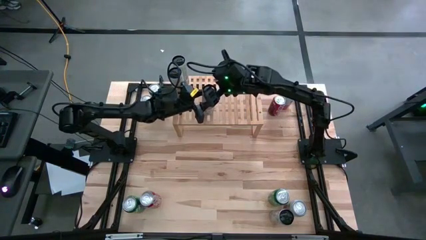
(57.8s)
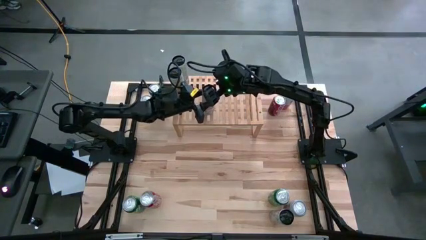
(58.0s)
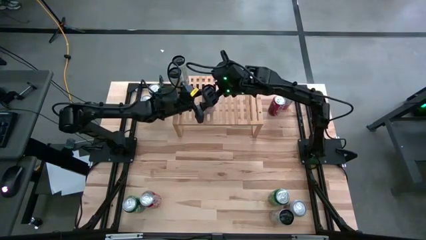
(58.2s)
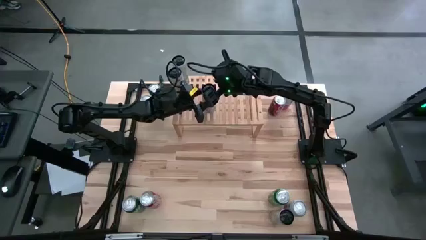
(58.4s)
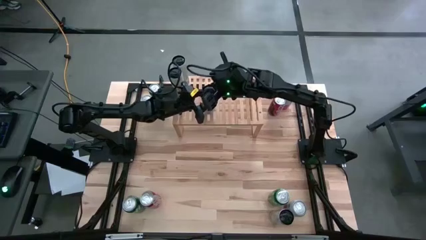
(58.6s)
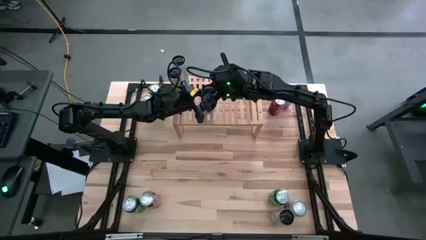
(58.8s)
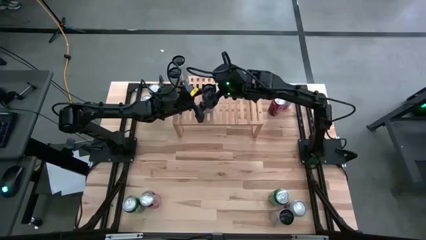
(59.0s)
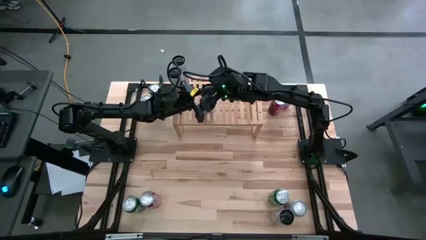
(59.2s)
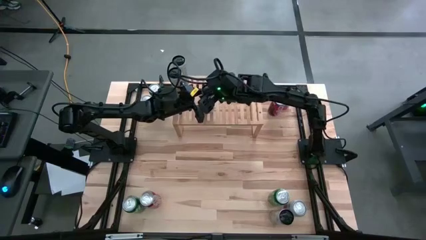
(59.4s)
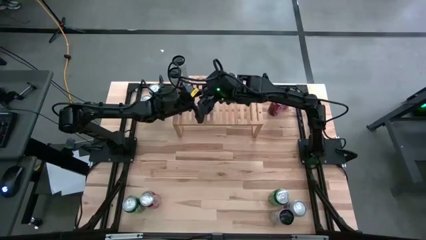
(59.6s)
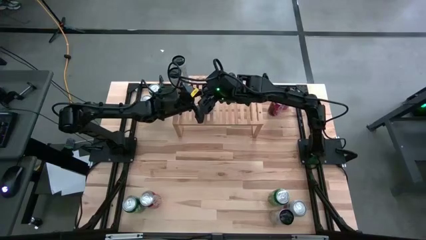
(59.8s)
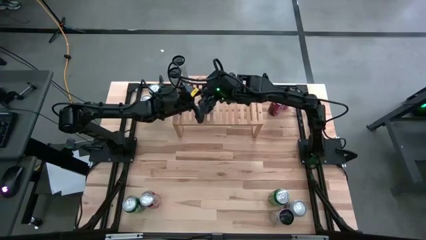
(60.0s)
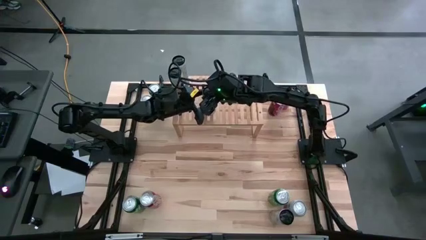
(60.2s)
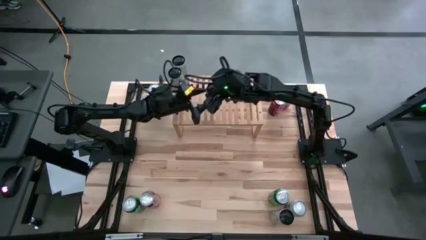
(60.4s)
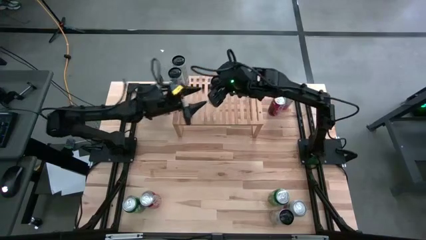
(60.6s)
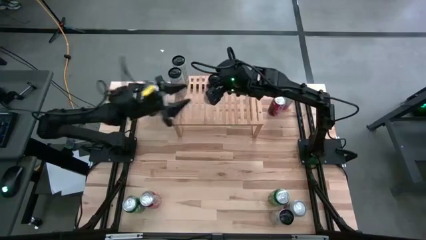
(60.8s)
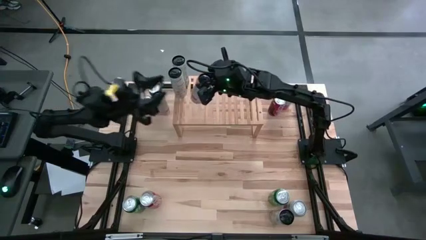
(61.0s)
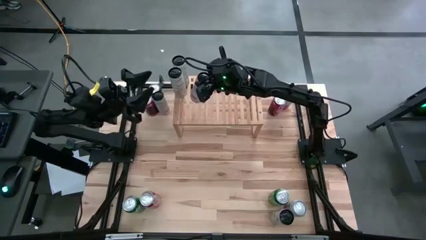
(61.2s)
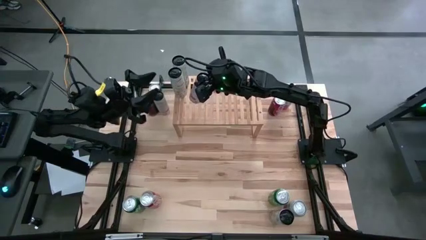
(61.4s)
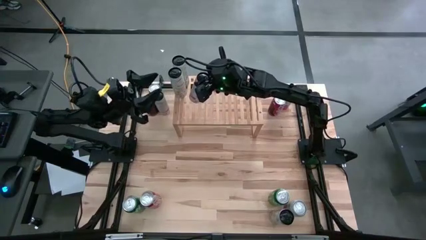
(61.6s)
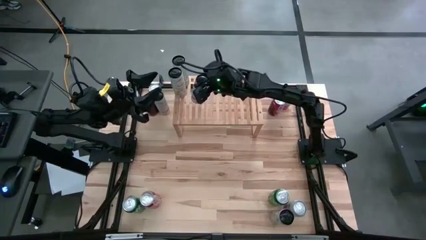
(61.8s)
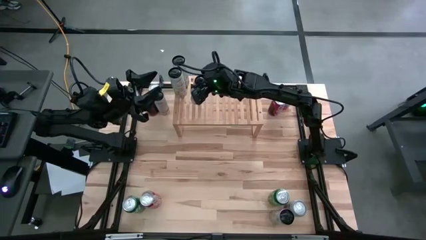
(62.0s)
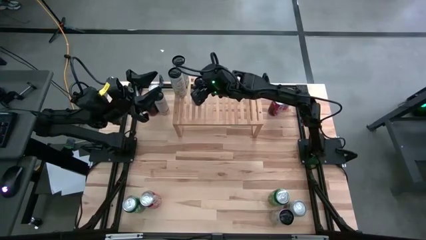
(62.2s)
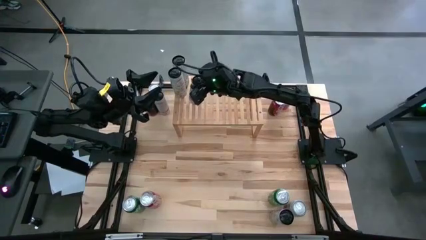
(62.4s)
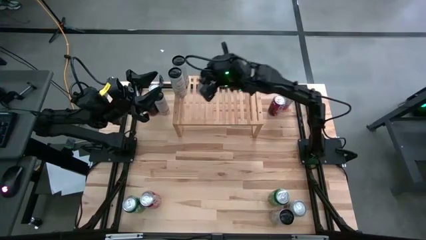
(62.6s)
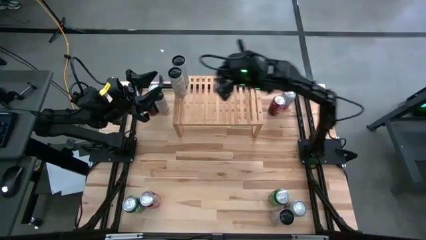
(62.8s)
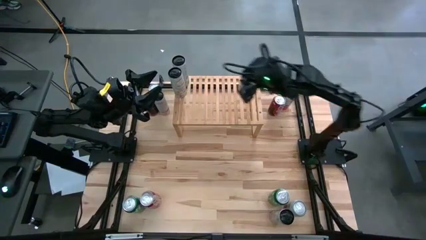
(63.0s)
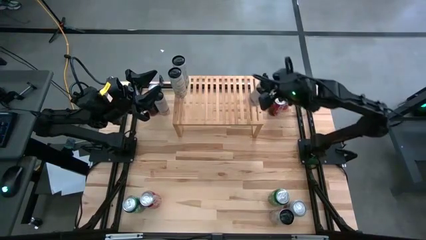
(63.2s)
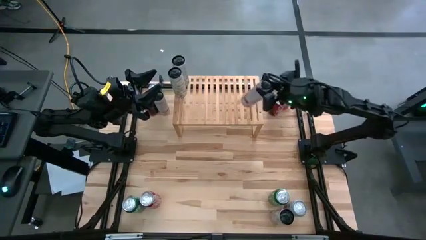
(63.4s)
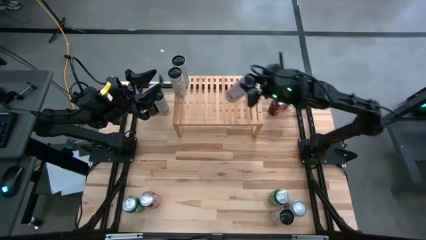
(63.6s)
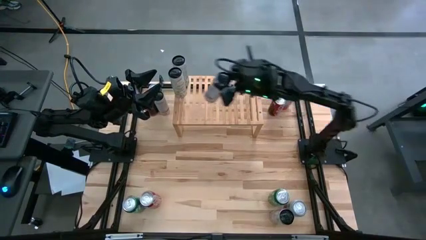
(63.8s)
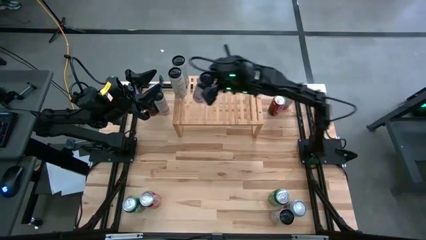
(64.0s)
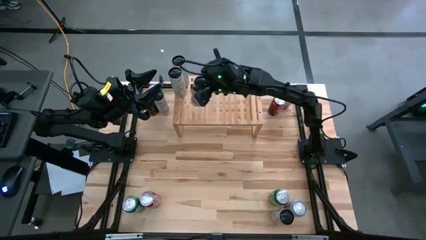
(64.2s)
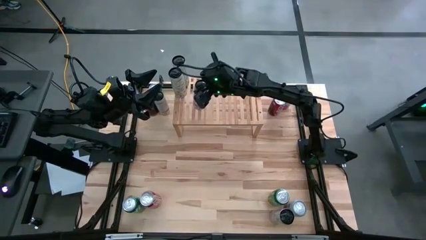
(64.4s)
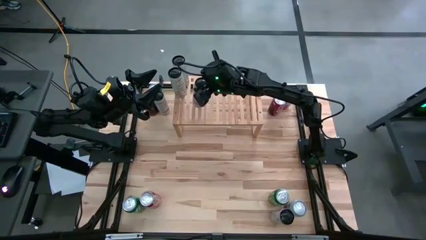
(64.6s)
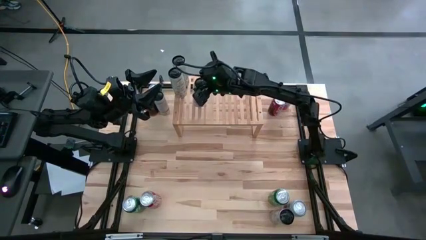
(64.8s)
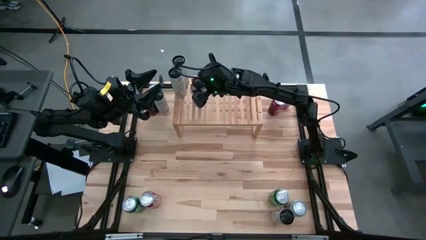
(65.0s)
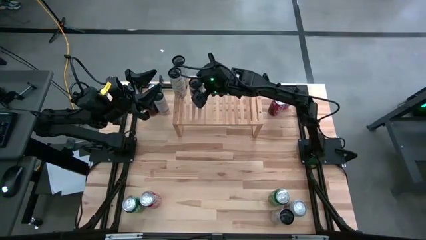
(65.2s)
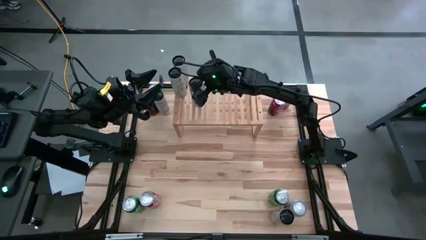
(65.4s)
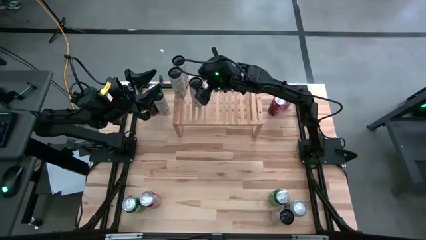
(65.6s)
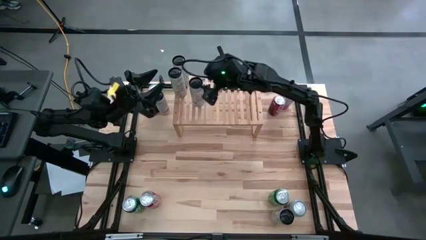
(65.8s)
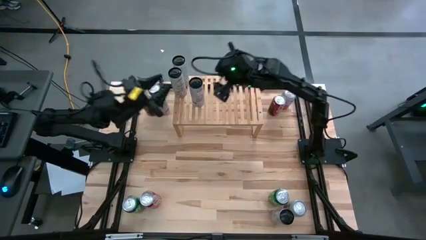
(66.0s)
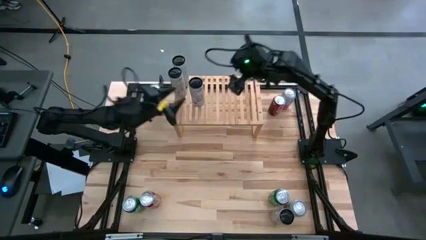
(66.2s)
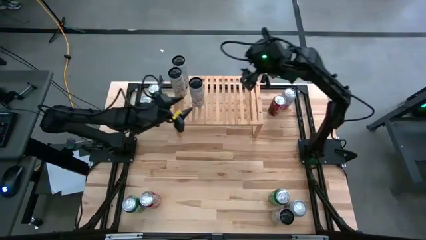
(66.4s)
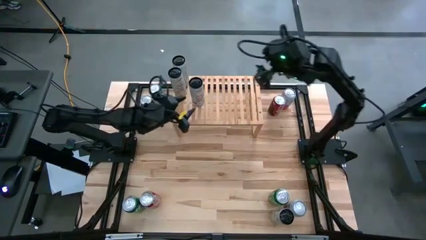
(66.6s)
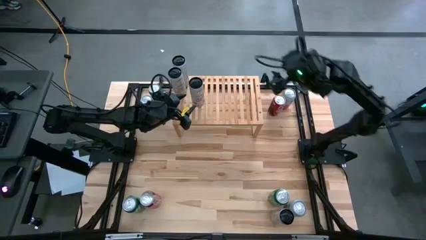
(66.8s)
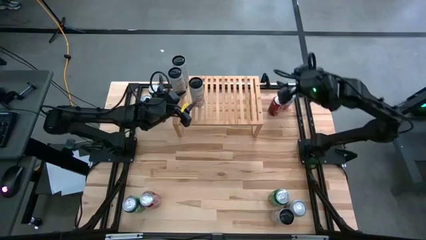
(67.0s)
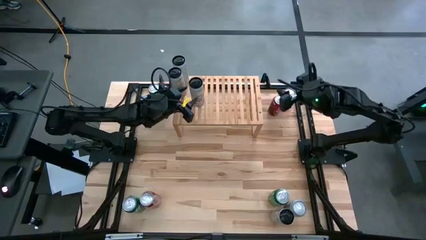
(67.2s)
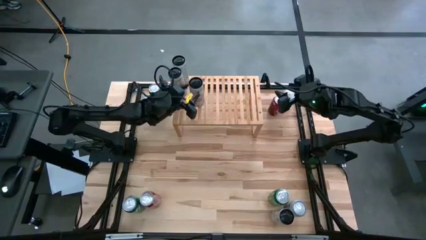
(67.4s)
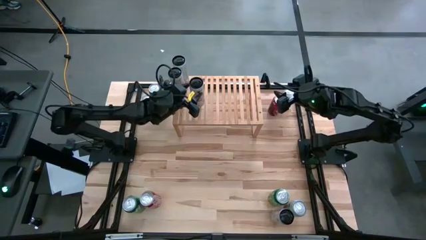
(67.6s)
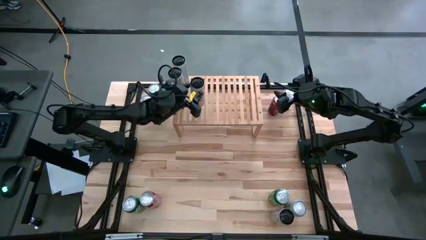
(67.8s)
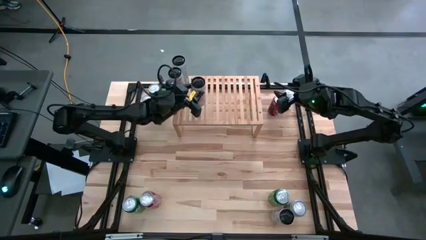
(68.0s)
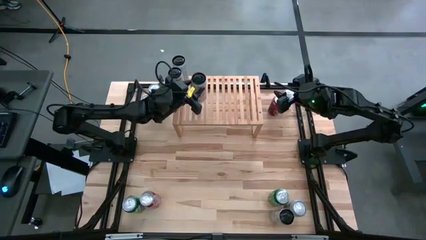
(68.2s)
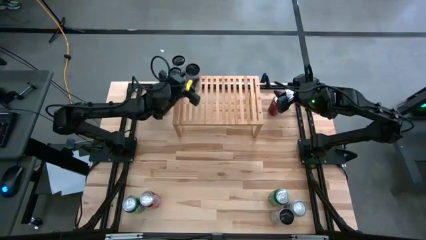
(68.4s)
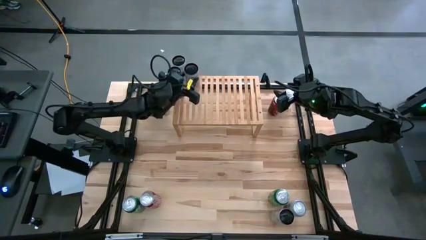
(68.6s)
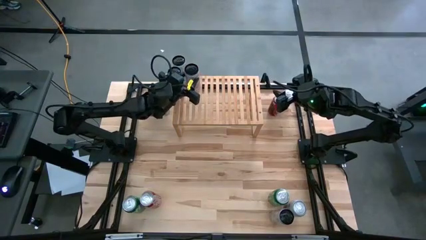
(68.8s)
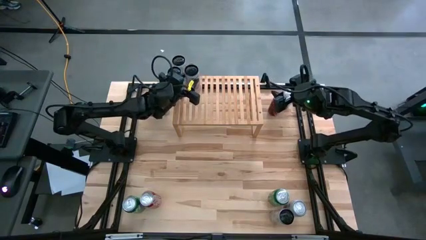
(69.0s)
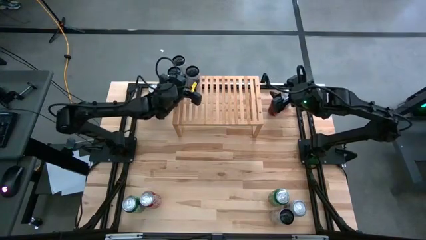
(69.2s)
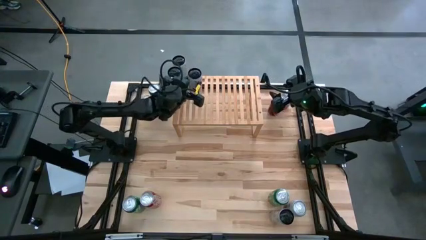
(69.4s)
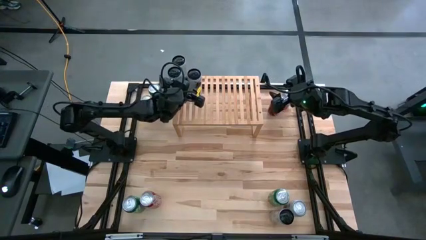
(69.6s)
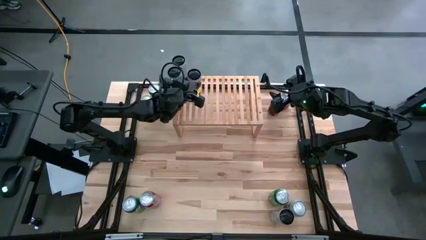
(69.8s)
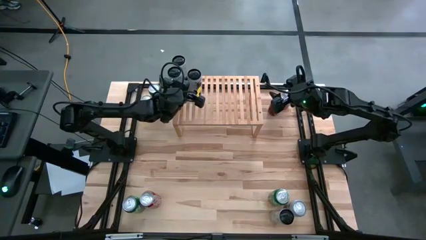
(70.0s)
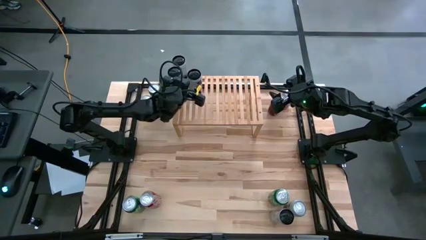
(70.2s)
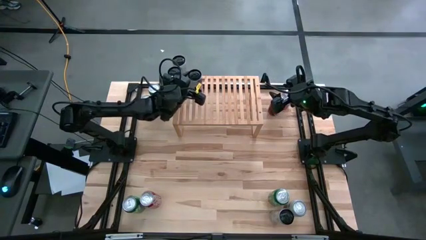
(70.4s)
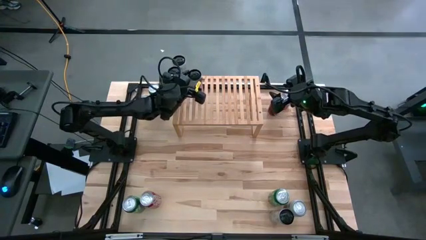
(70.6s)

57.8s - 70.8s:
Task: Place canned beverage on shelf
Put the top right white pink soda can on the shelf
